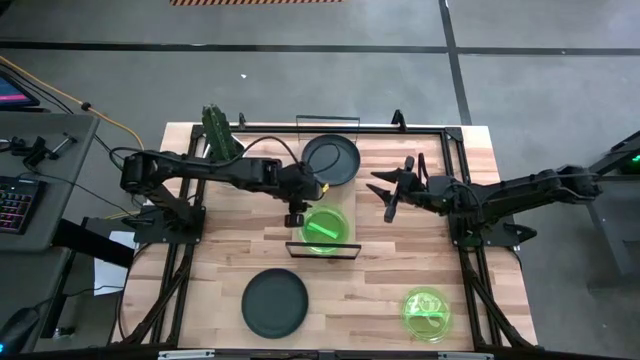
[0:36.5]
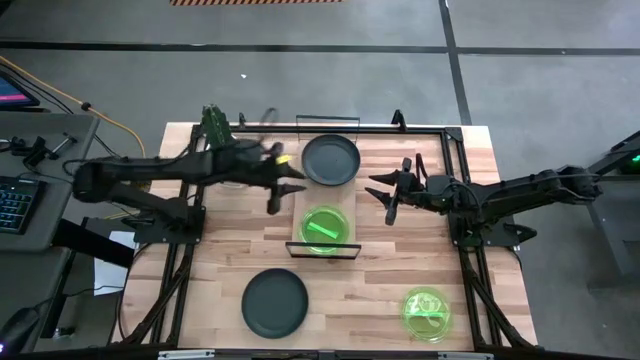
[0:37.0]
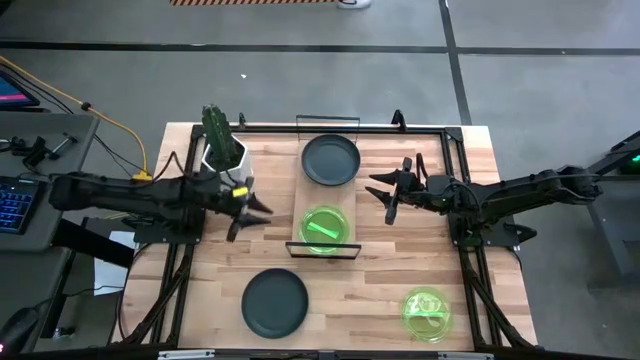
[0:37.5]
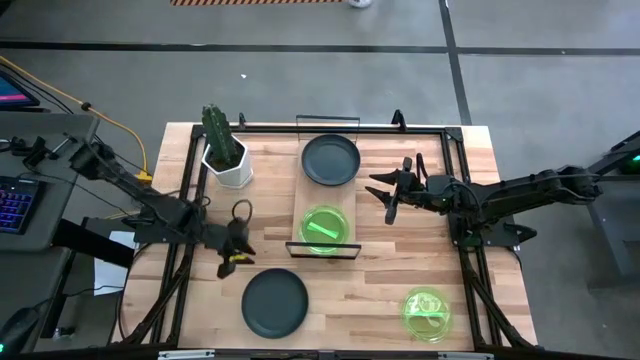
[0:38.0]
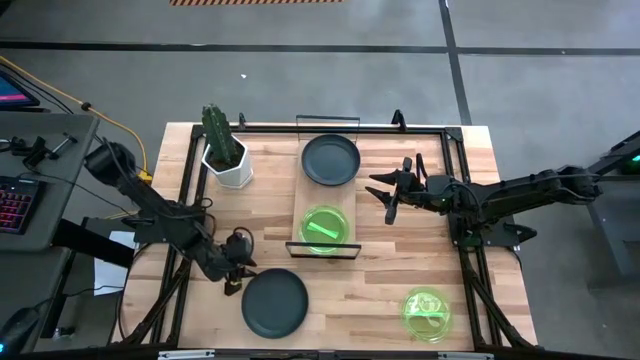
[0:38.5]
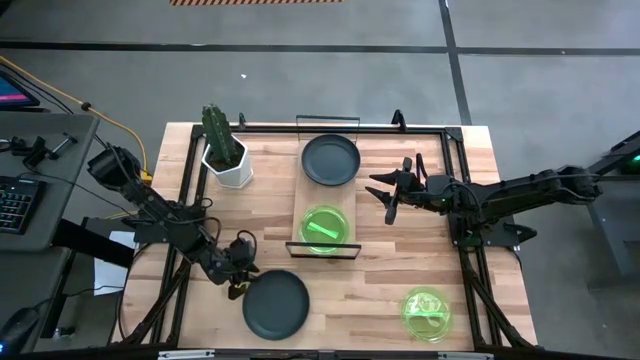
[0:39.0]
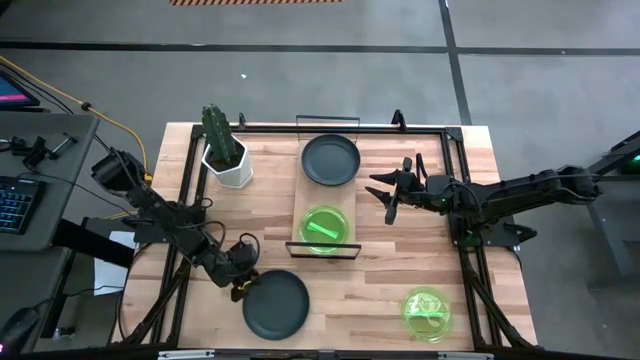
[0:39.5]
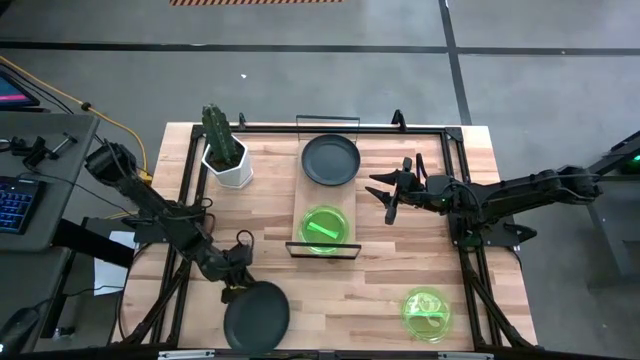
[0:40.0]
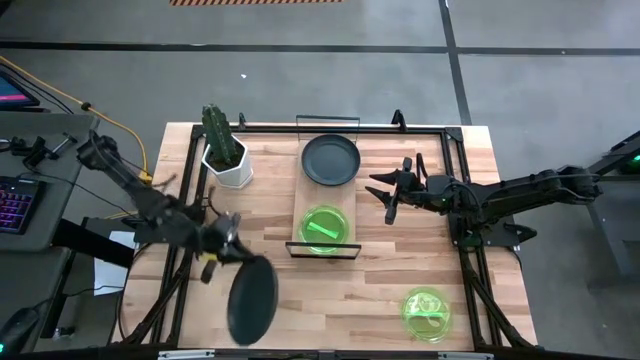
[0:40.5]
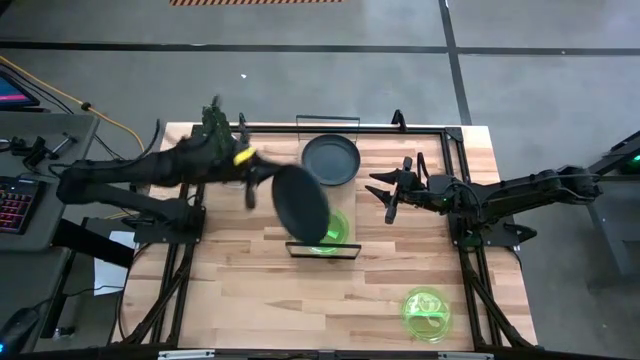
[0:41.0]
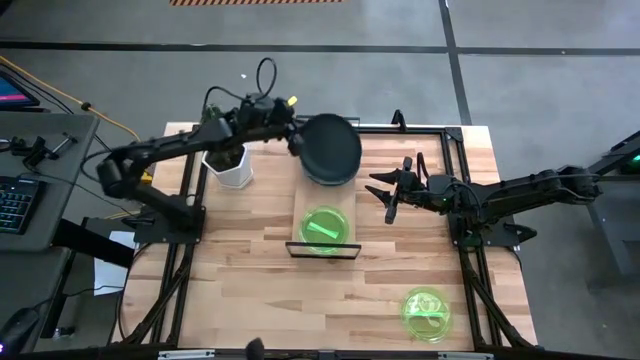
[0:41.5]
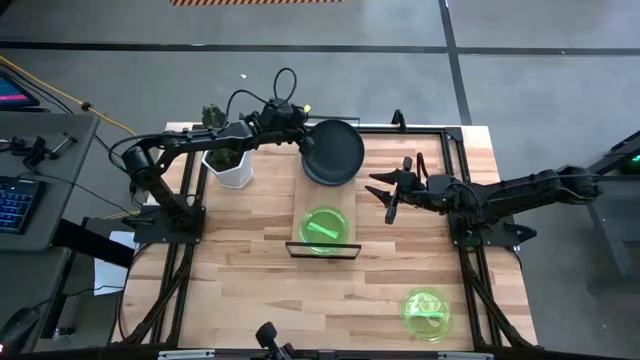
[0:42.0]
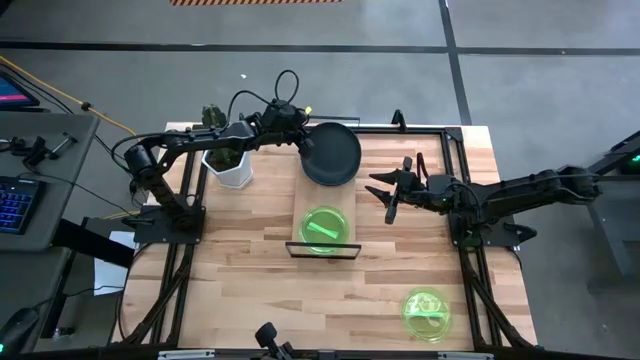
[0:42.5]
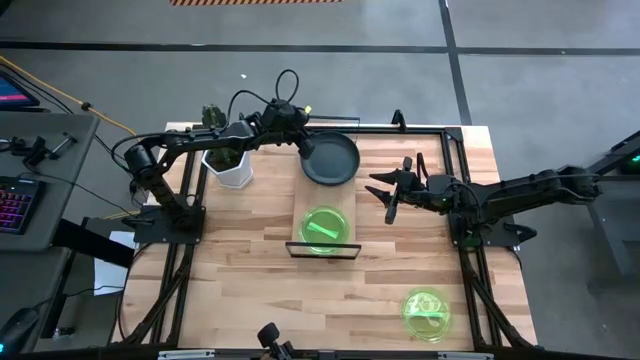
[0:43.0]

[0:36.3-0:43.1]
Task: Place and stack plates onto a shelf
Stack the black plate on top of the other black plate on the shelf

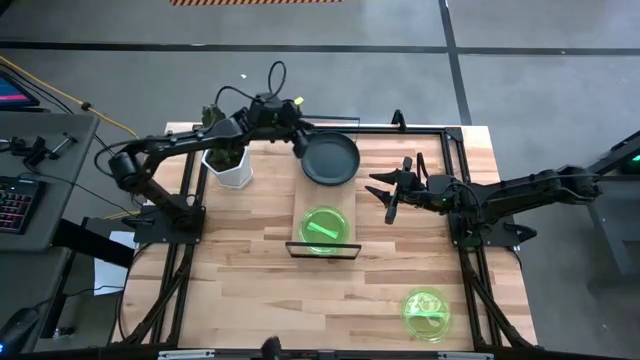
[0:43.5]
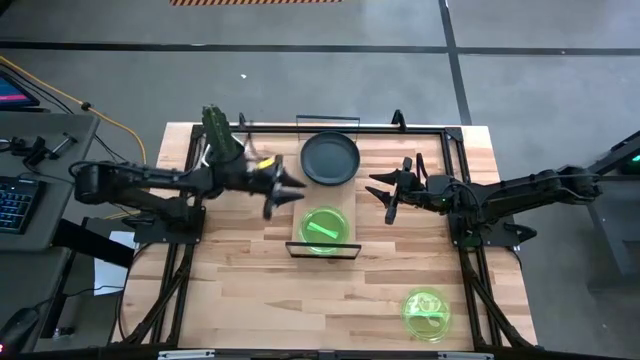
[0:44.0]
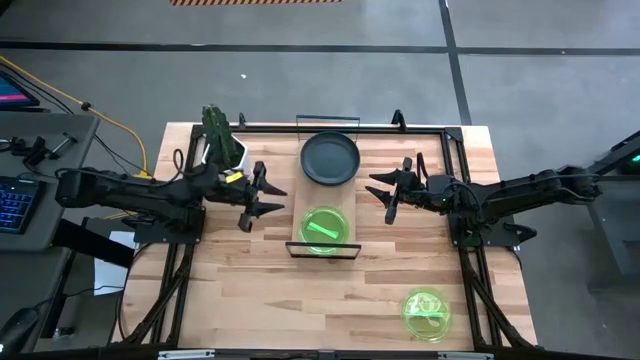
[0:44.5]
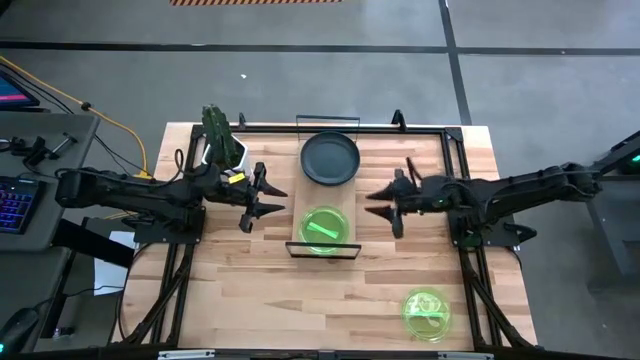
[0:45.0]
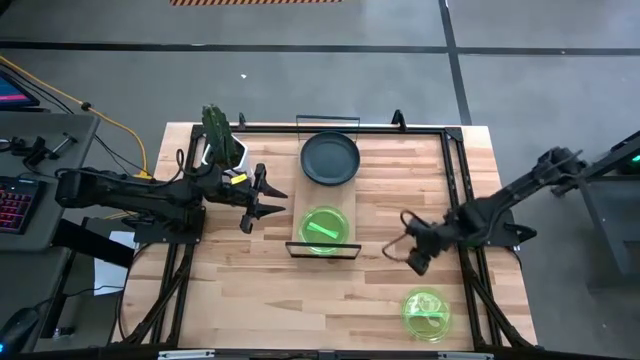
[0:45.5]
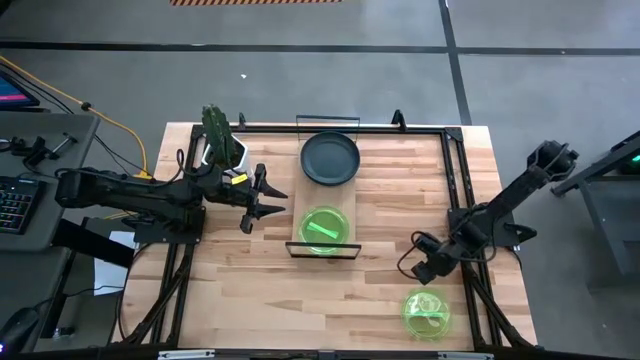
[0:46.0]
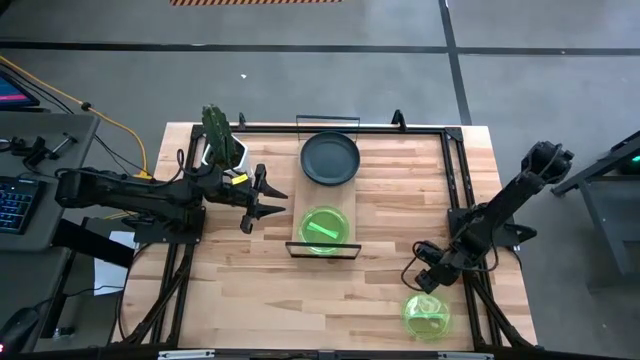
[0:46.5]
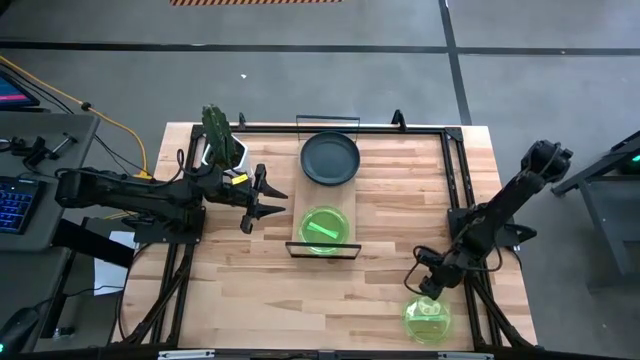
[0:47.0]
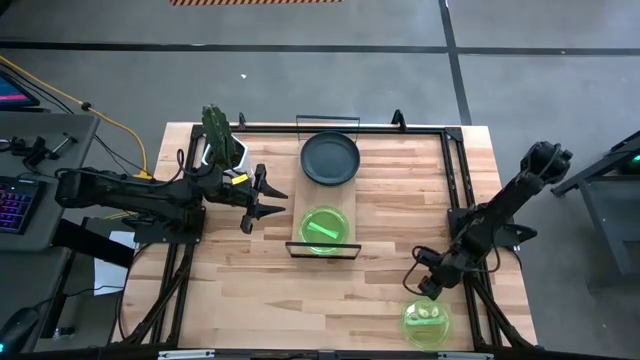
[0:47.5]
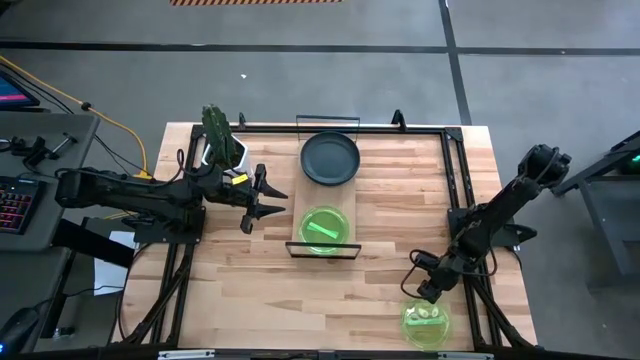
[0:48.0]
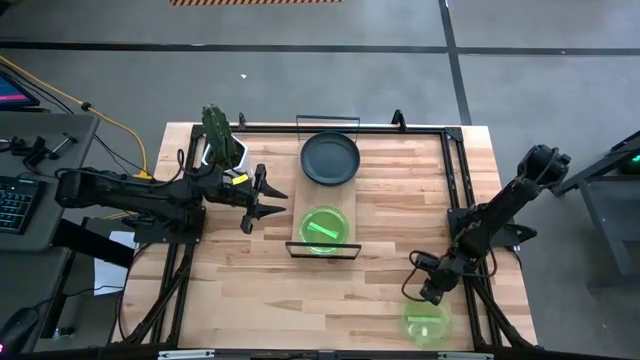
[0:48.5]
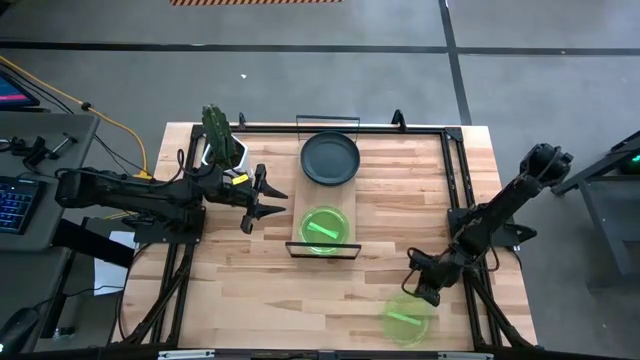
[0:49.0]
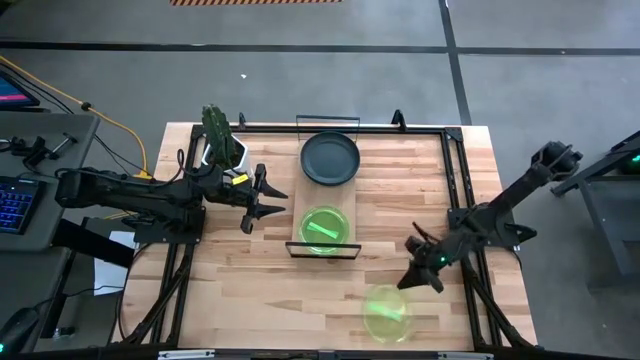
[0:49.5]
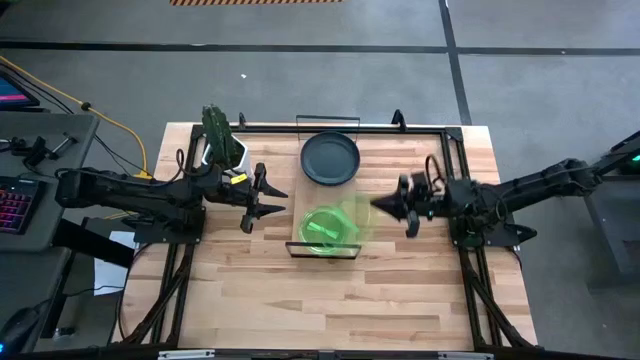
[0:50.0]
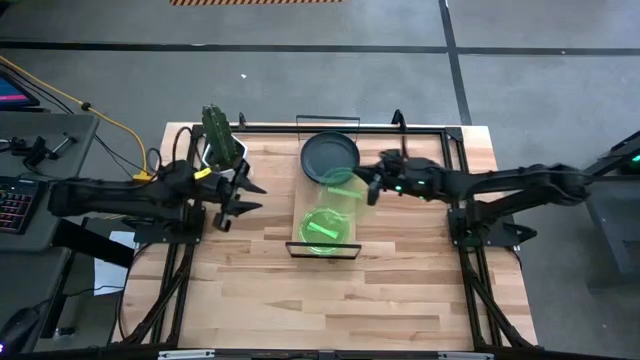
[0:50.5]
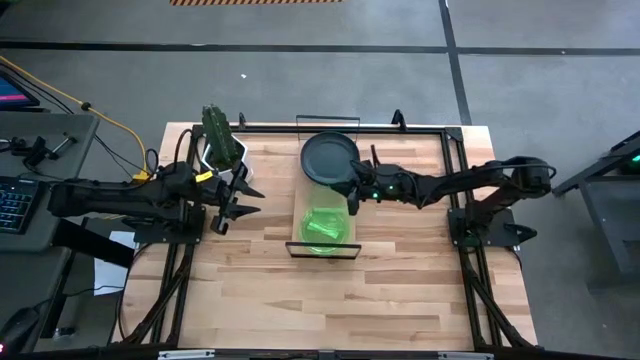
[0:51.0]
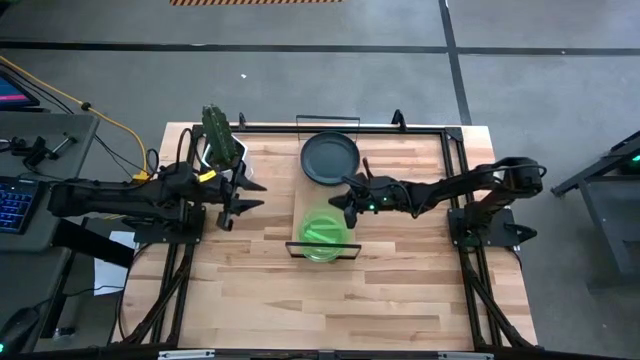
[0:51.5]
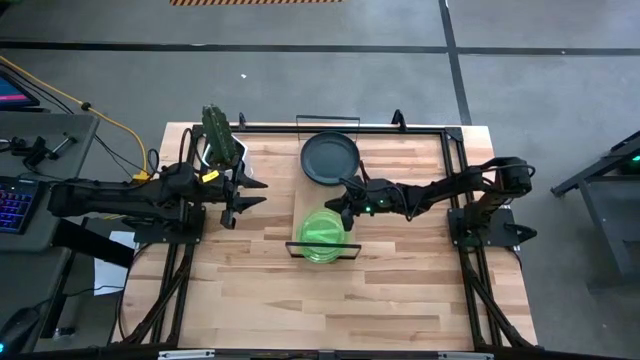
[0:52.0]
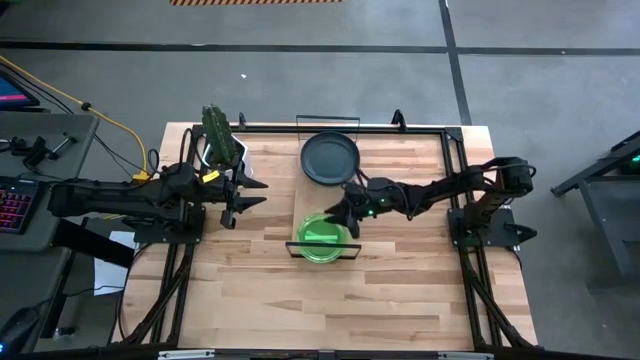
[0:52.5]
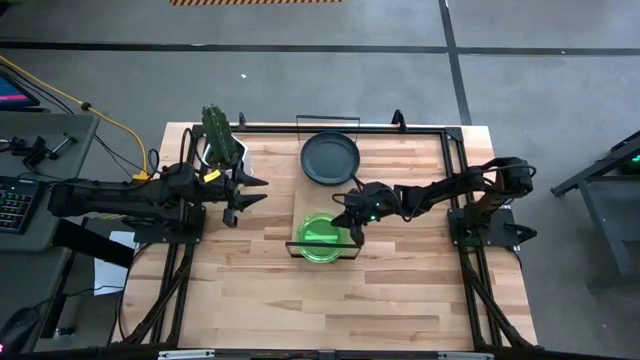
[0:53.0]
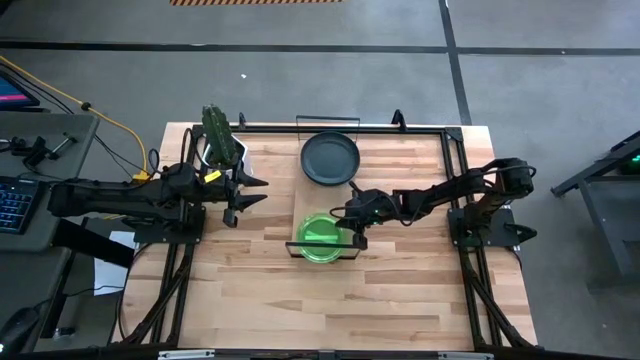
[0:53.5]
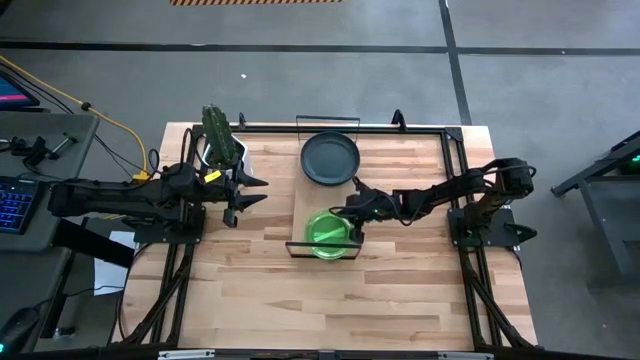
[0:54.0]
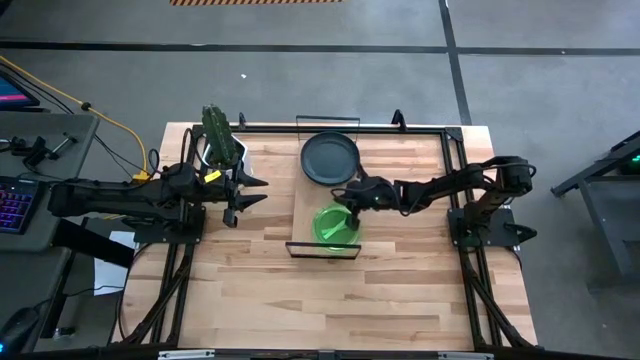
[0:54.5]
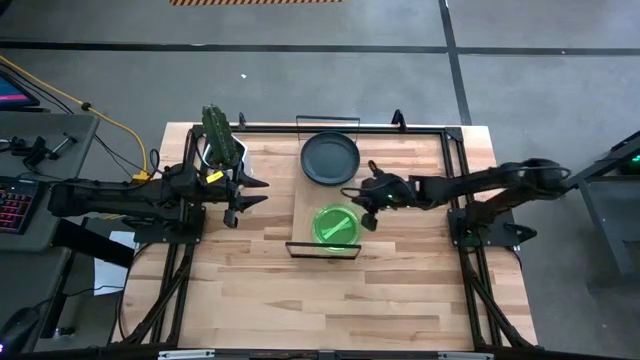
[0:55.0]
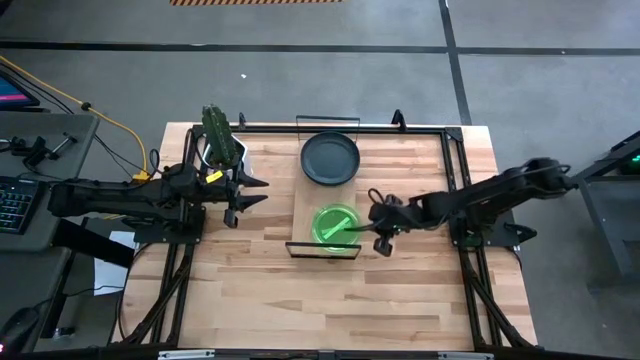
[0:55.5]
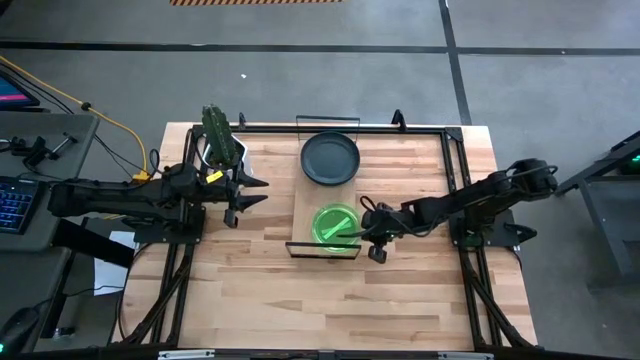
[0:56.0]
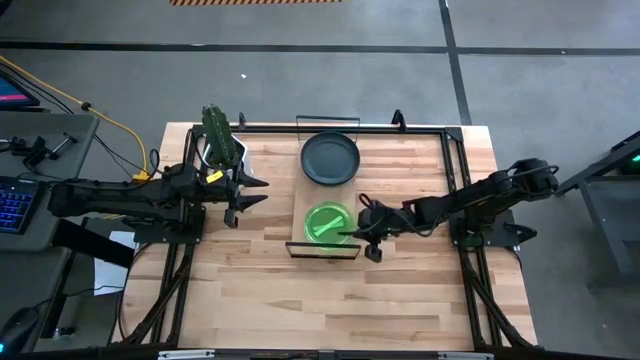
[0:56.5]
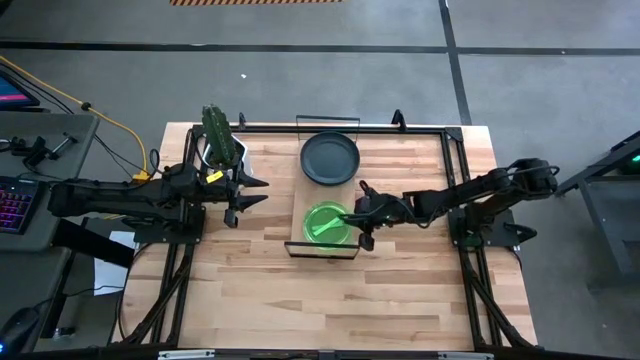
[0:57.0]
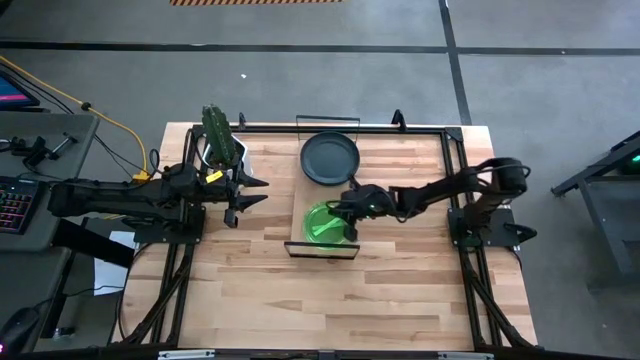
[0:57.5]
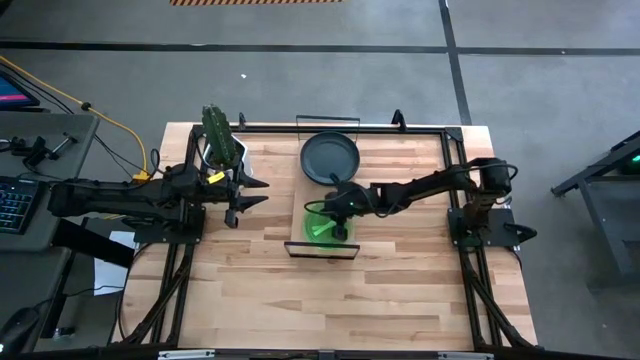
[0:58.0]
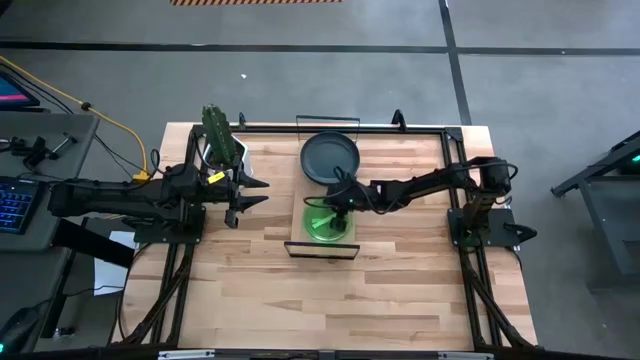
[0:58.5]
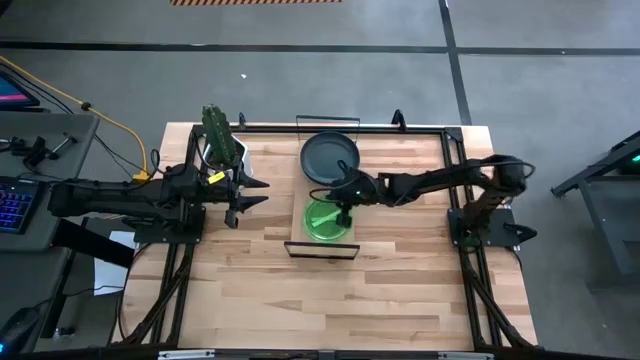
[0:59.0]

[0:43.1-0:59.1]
Stack the transparent green plate on top of the other transparent green plate on the shelf
